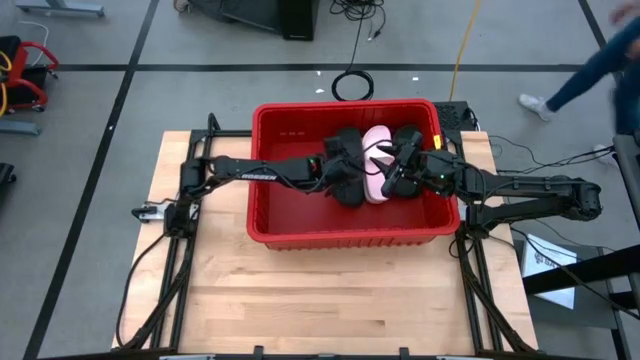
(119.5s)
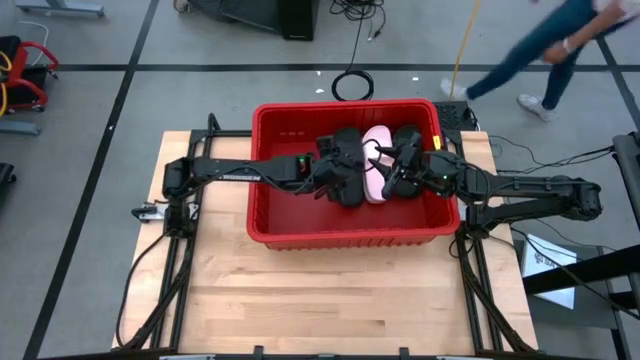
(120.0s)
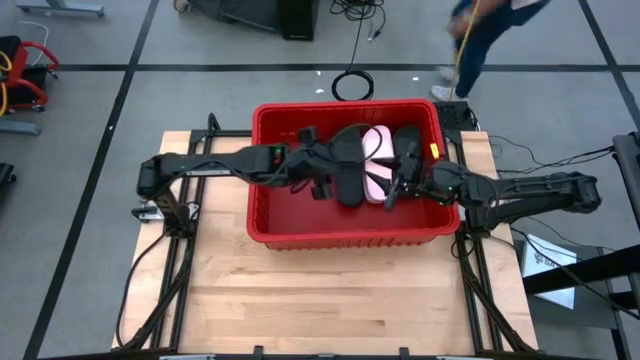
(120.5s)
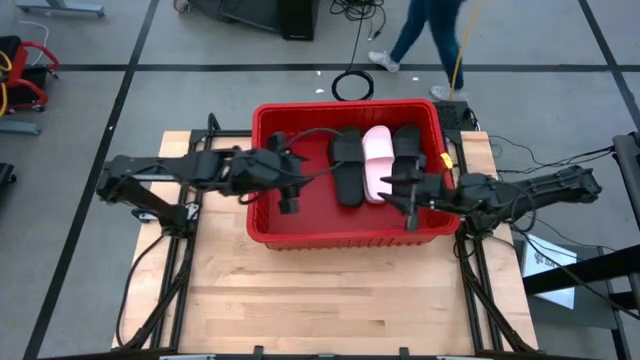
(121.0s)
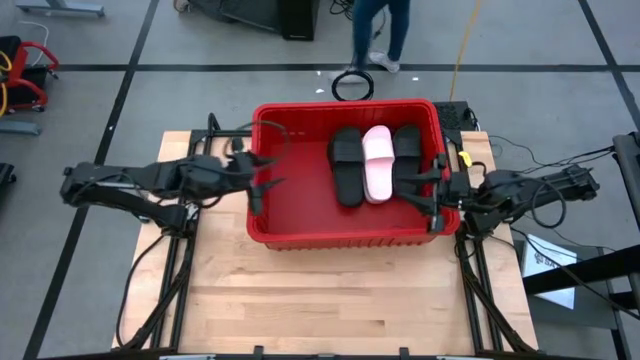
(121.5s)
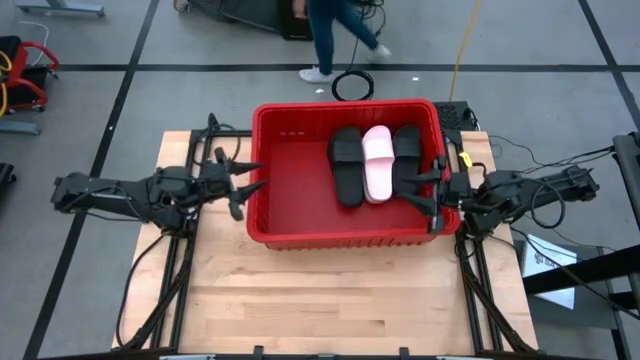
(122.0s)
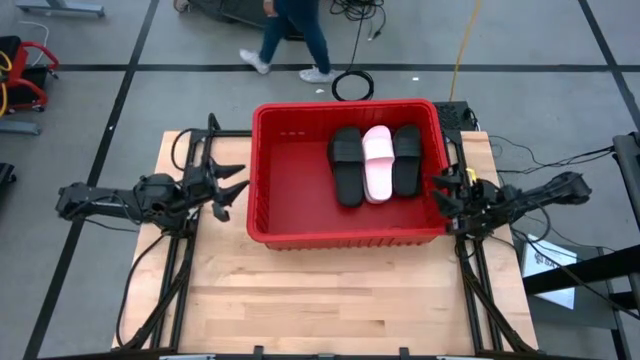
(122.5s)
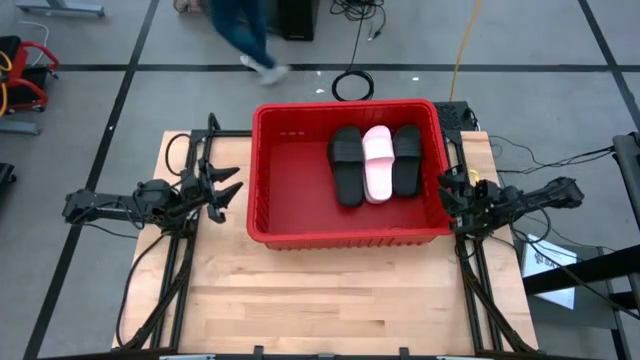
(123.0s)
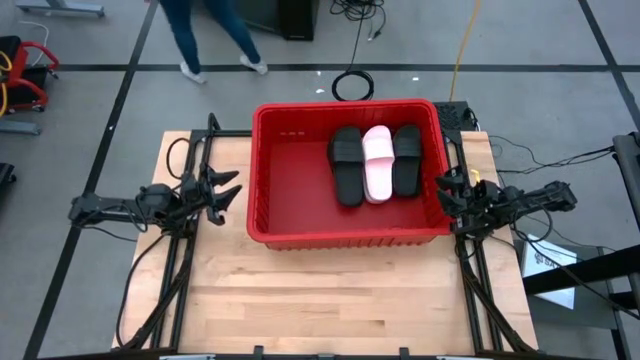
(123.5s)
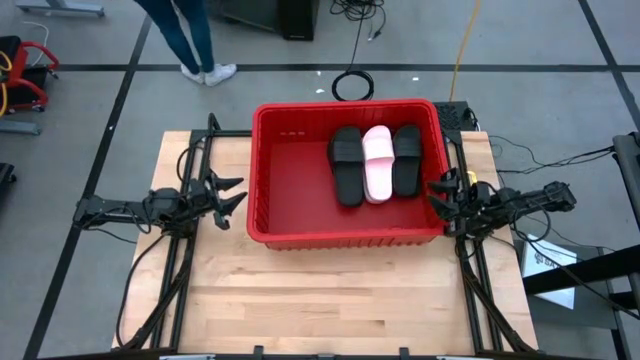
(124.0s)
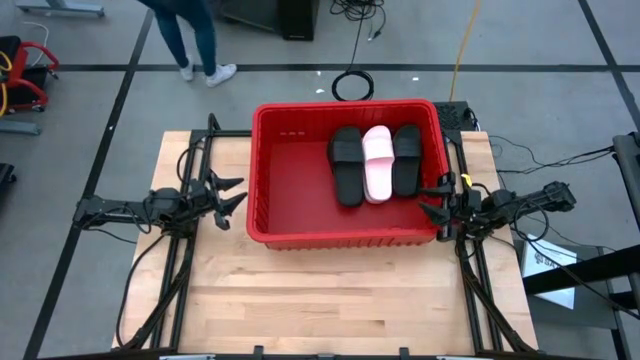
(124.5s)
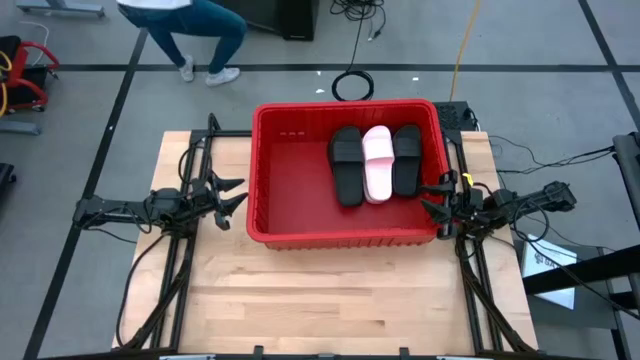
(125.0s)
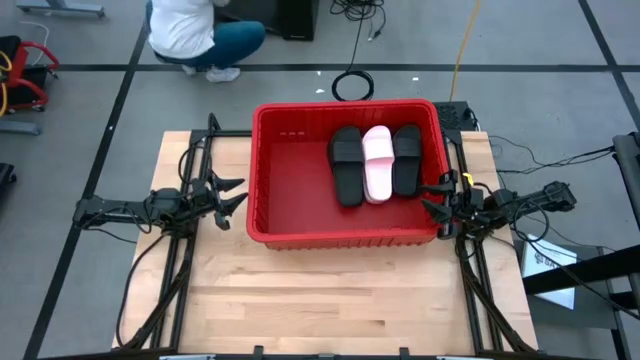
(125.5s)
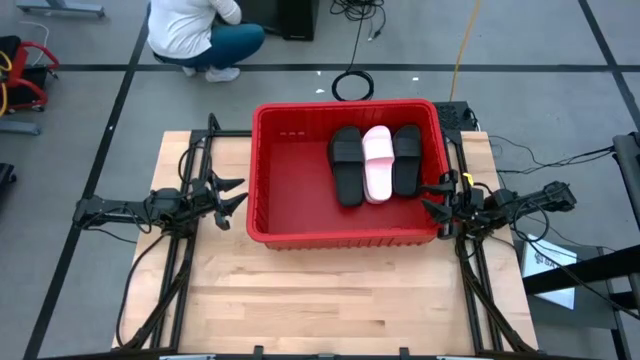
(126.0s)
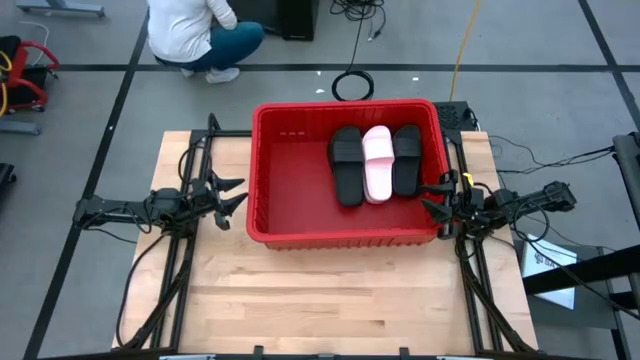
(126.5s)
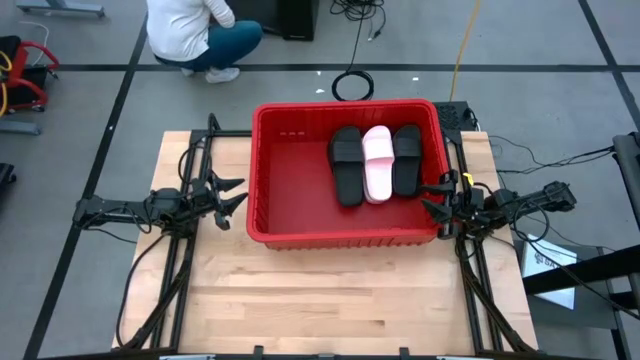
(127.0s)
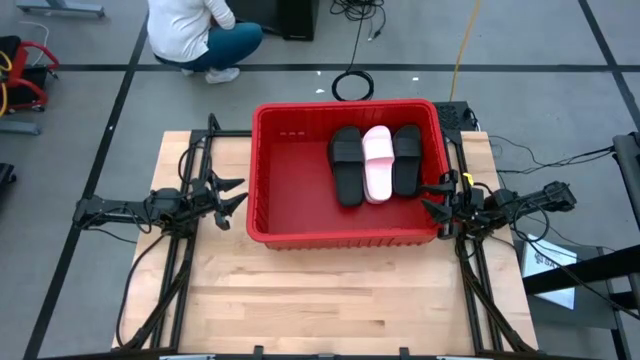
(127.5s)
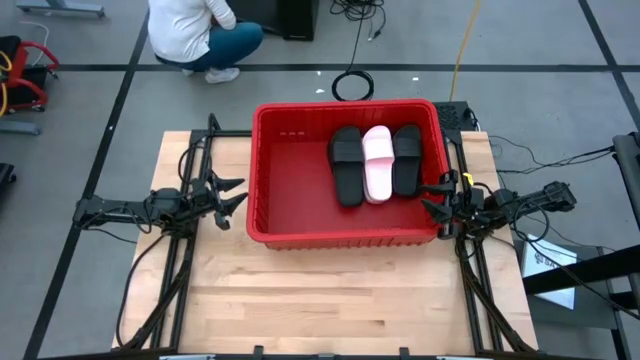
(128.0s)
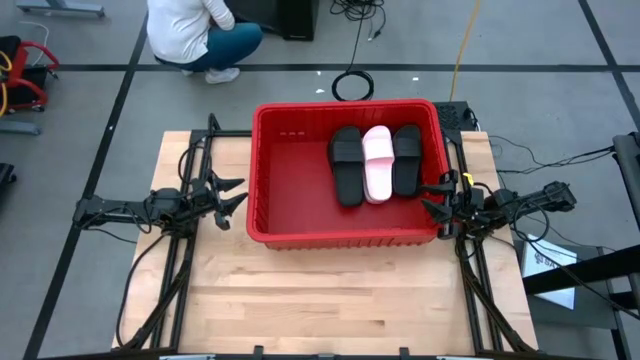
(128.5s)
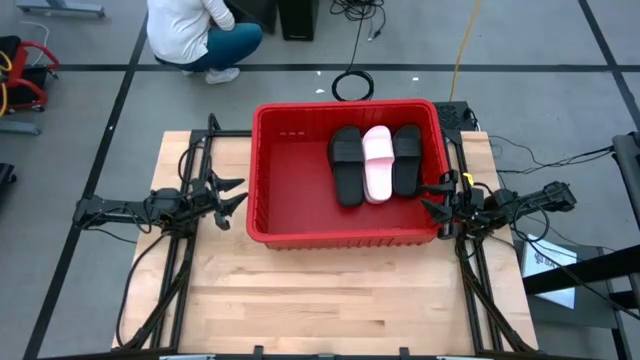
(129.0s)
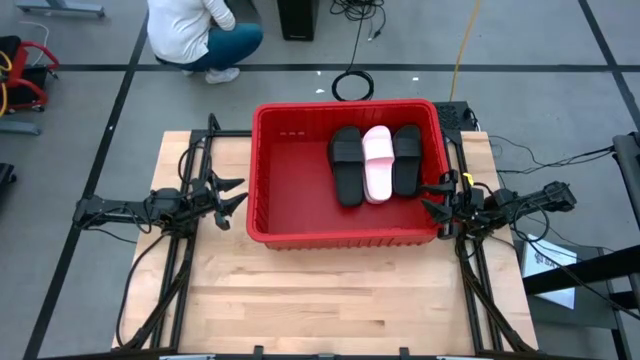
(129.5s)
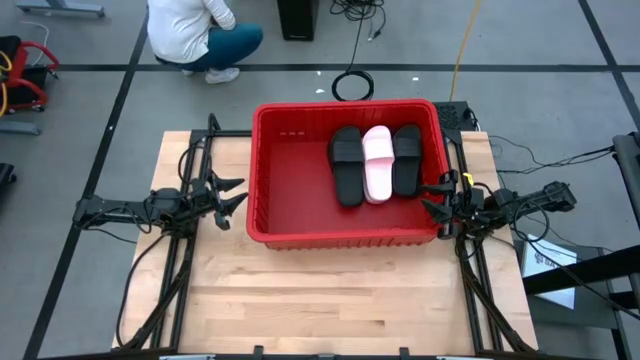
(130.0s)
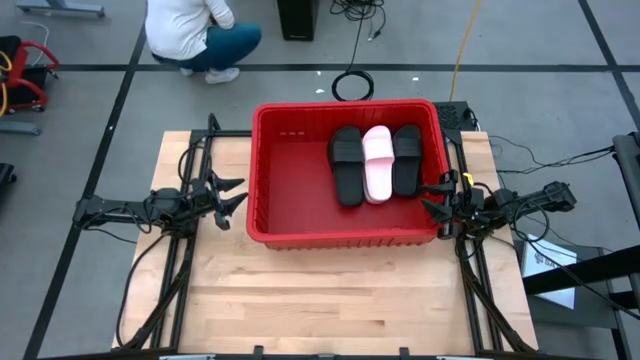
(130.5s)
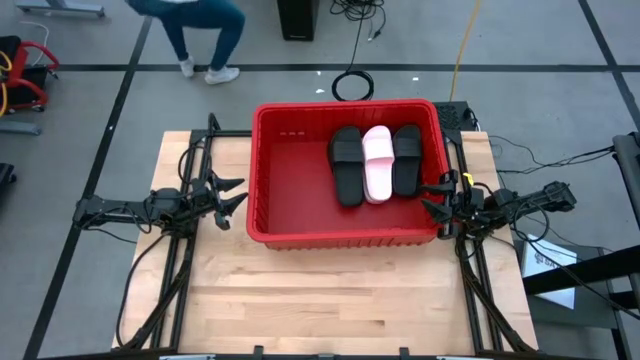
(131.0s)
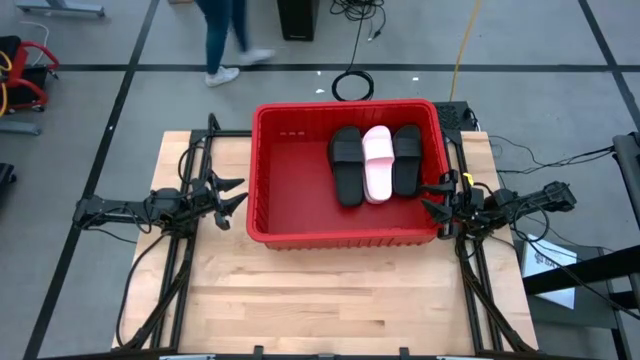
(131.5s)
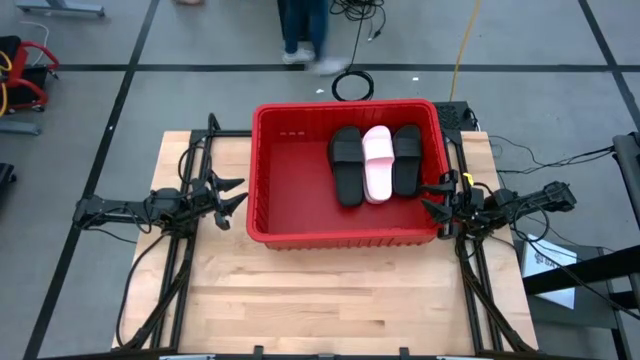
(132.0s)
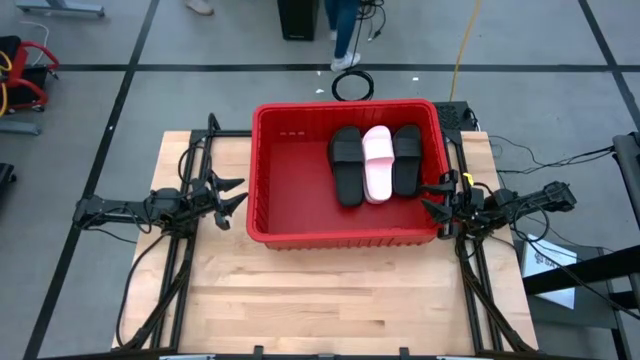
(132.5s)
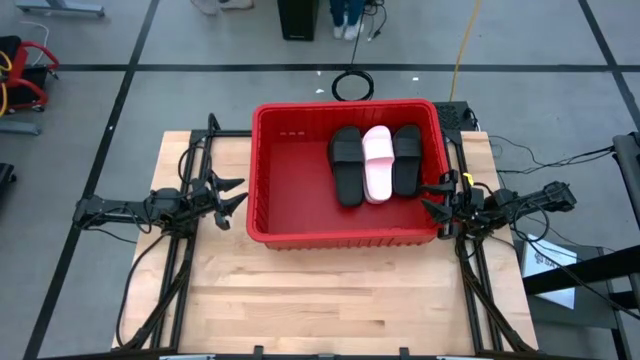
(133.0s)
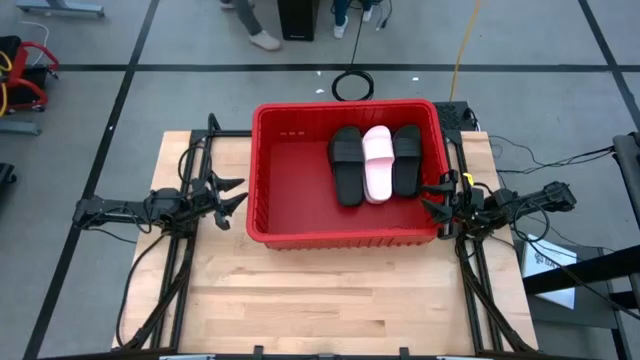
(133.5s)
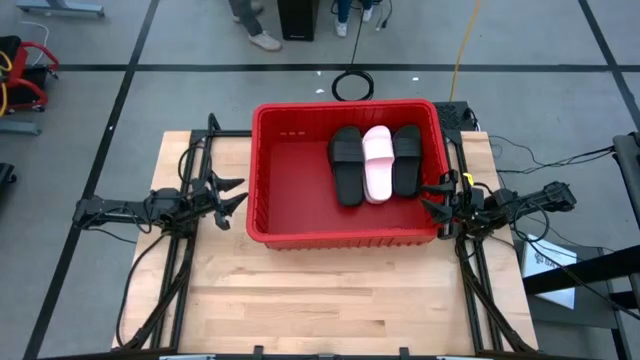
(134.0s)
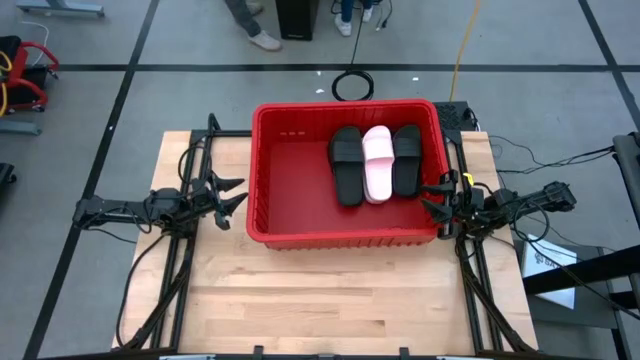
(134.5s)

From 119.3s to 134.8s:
Task: Pick and place slides into bin
Return to Home Position
